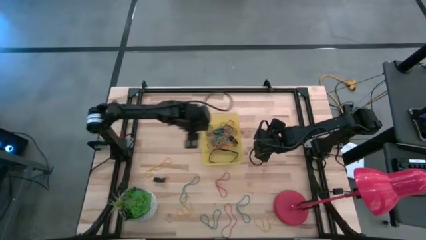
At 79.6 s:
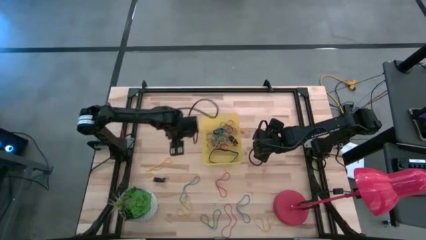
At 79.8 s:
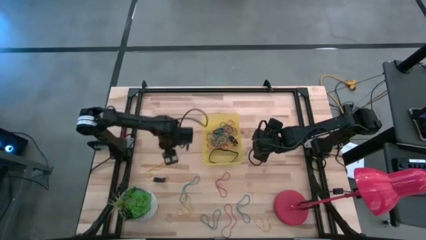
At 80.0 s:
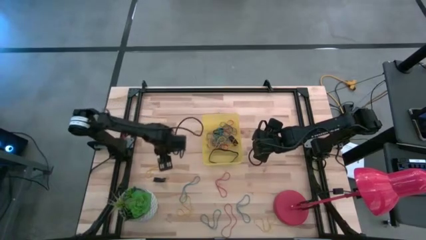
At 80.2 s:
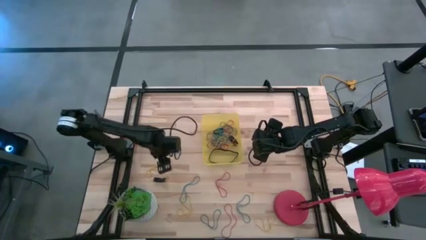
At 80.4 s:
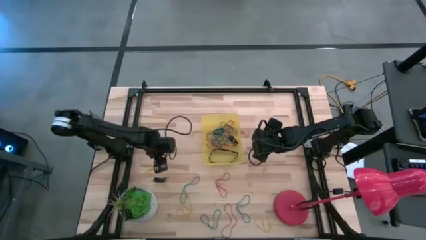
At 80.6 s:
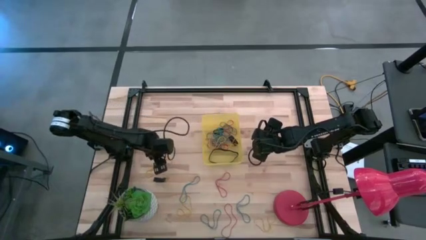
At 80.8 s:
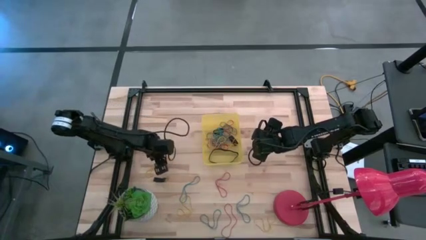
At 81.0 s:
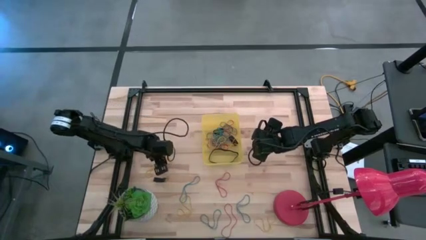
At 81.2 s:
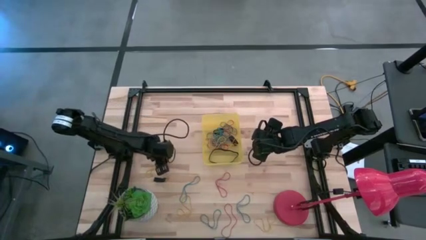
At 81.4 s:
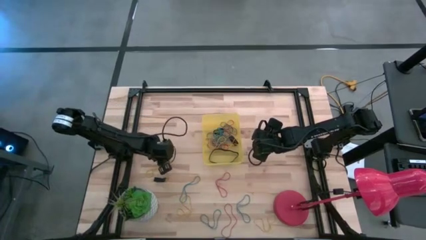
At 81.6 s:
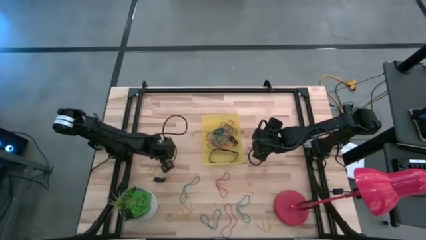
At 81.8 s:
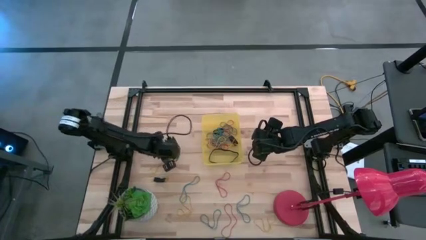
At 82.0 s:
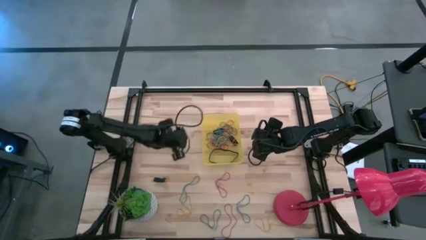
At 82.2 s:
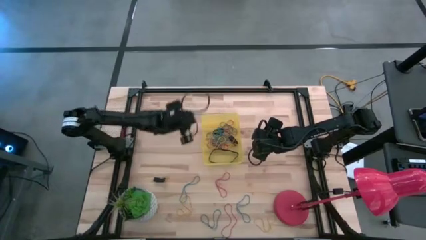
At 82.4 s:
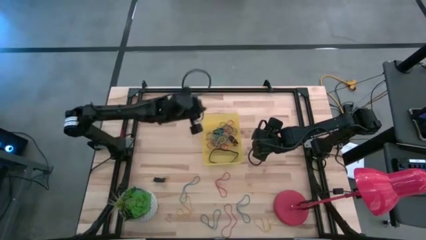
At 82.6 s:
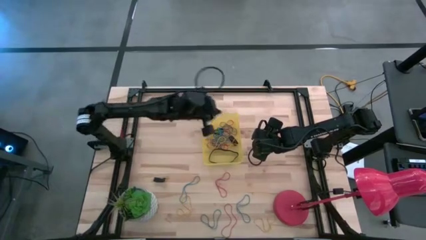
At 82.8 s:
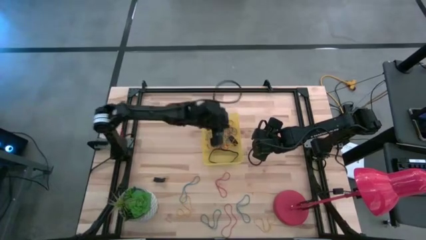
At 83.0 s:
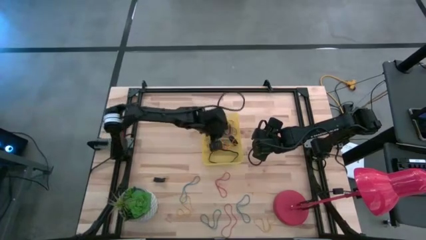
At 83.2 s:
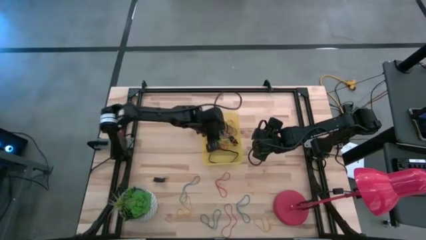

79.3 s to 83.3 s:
Task: Pick and place rubber bands into bin
Put the top left yellow rubber band into the yellow bin

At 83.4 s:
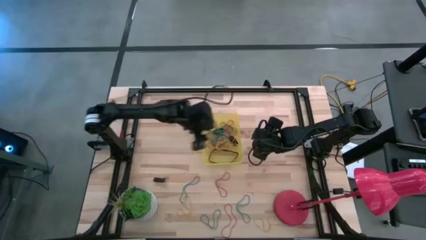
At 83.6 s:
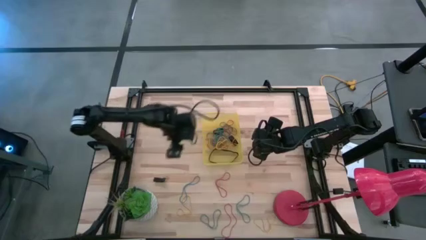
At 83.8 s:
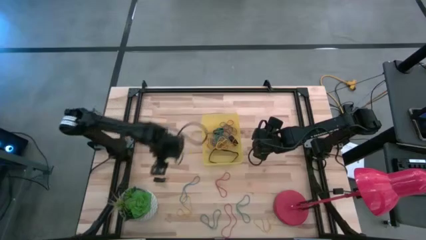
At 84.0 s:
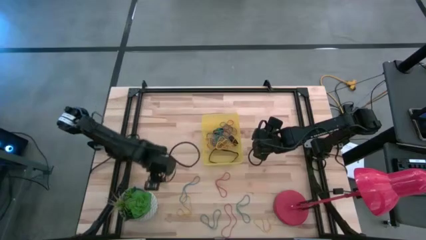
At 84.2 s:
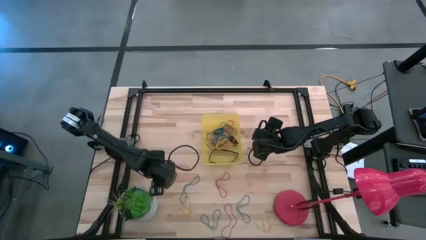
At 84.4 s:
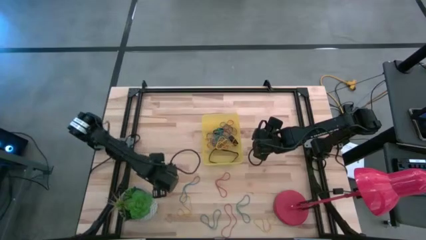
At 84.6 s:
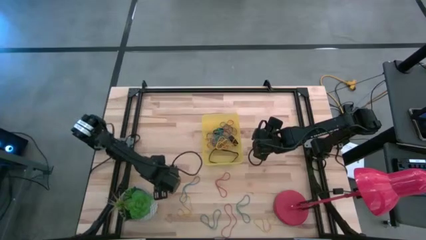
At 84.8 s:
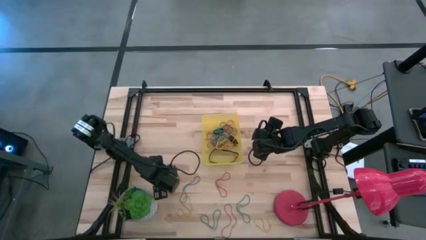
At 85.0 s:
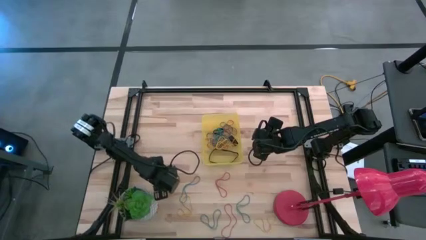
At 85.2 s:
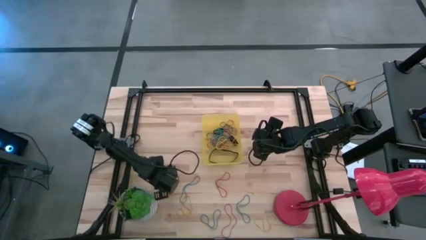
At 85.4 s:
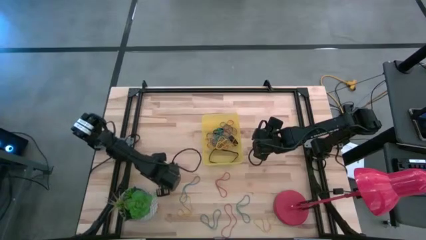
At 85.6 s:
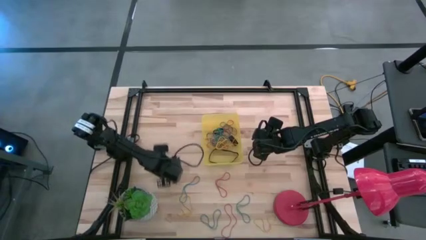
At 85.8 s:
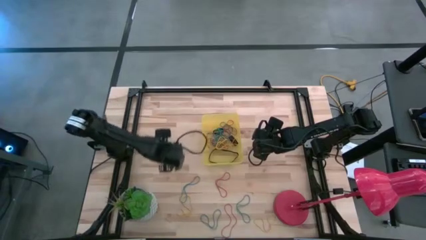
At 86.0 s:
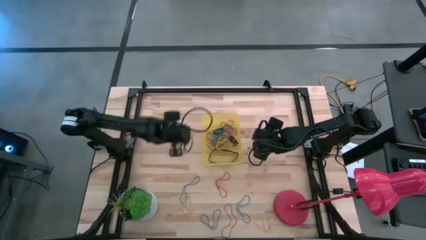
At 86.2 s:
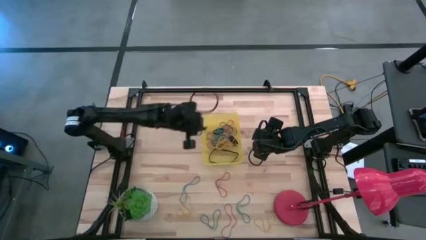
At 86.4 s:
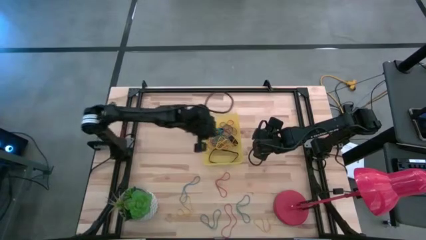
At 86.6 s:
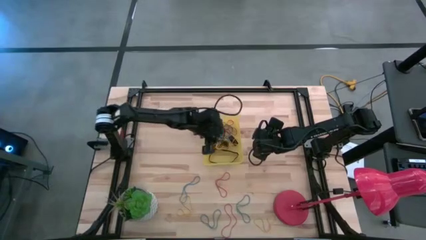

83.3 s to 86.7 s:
Put the small black rubber band into the yellow bin

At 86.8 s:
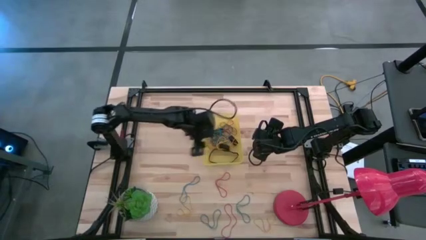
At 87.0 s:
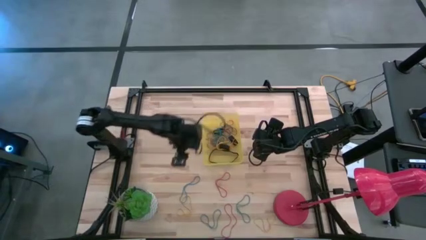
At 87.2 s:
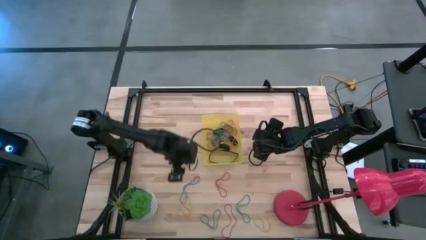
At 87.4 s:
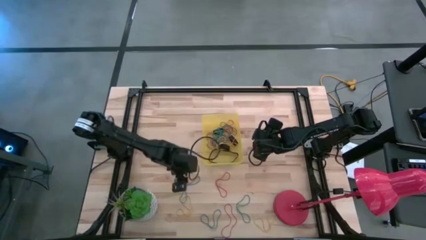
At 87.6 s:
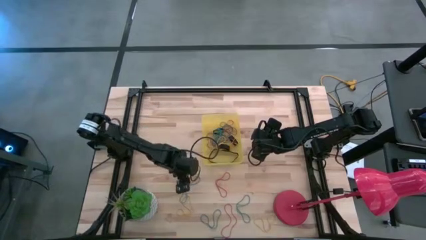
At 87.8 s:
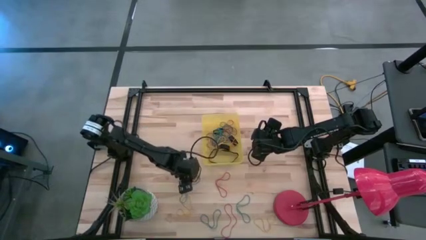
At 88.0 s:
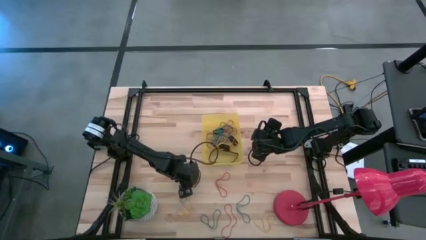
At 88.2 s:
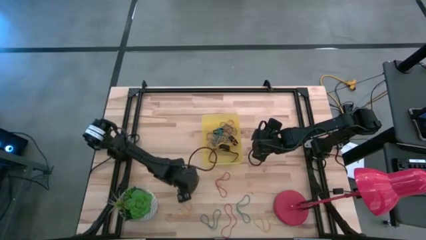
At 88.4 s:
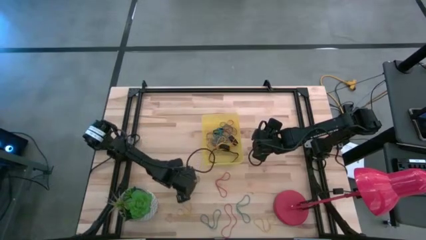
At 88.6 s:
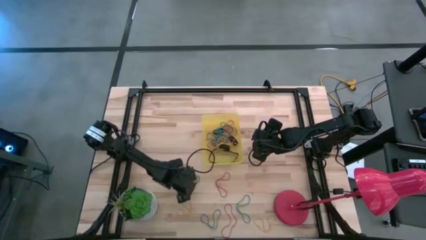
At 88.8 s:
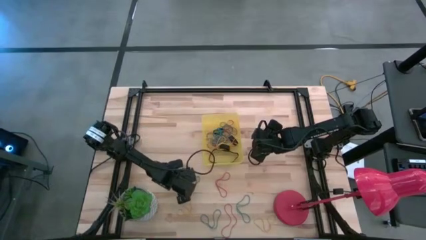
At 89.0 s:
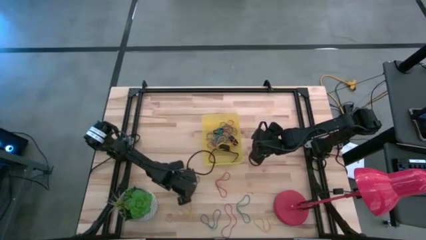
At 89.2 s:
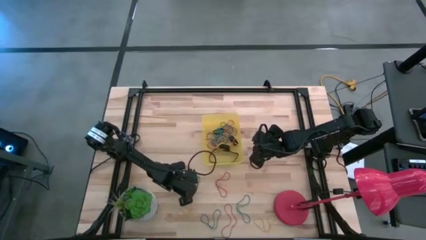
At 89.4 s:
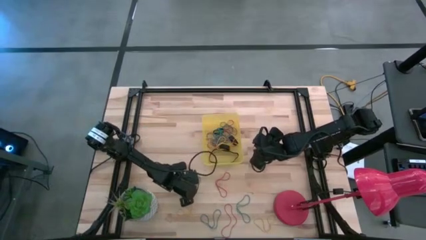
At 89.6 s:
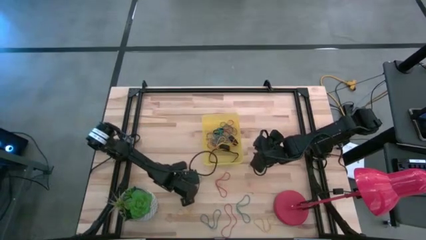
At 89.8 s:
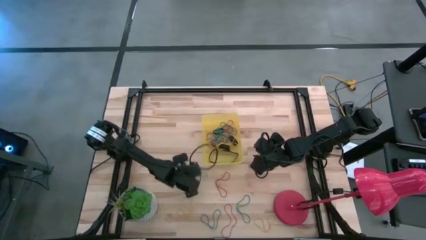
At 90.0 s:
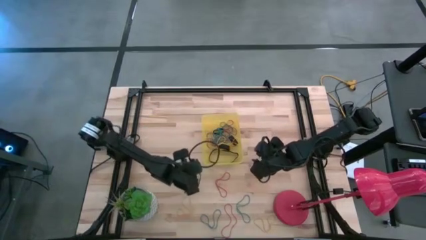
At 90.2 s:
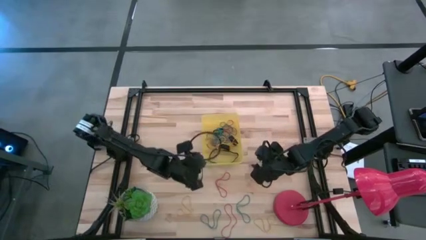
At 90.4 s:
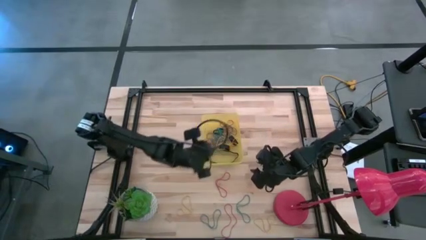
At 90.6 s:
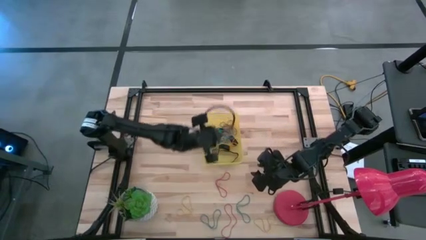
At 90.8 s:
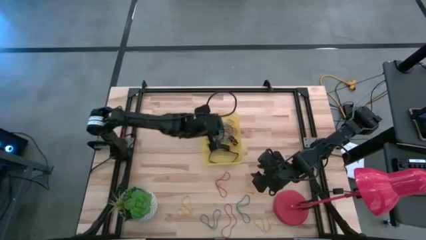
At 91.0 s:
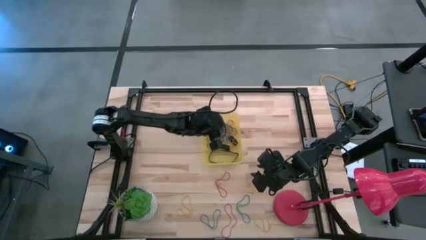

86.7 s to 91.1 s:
Put the top left blue rubber band into the yellow bin

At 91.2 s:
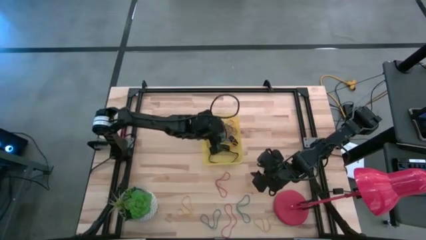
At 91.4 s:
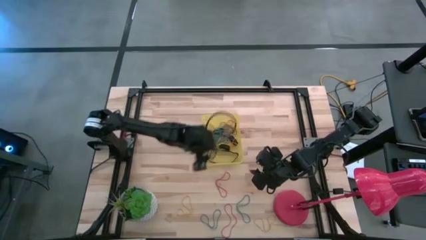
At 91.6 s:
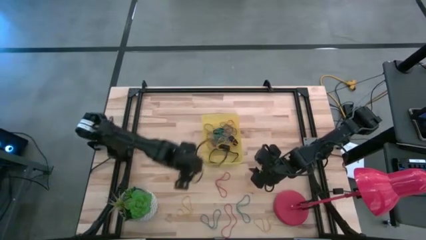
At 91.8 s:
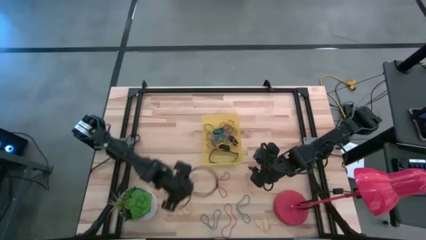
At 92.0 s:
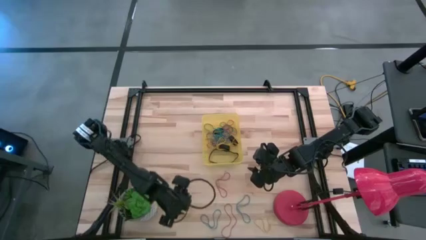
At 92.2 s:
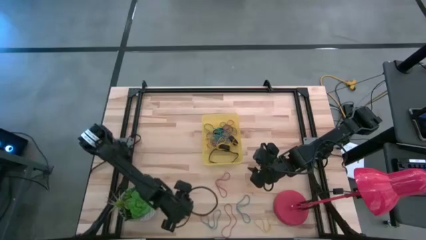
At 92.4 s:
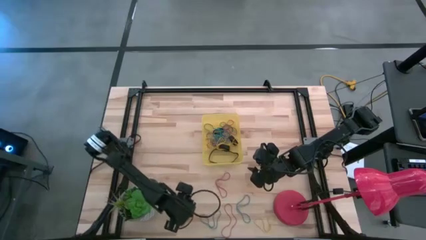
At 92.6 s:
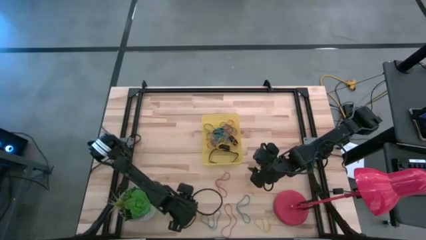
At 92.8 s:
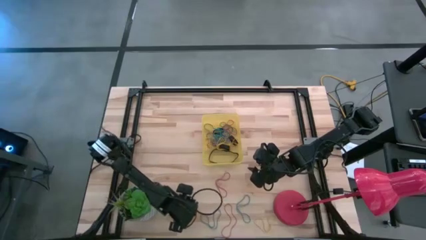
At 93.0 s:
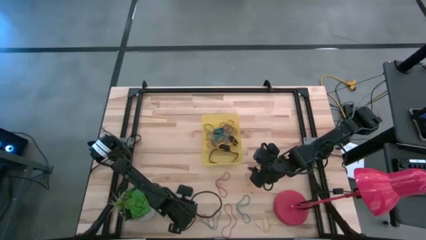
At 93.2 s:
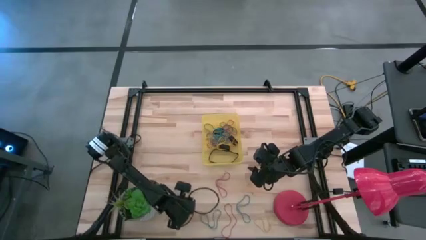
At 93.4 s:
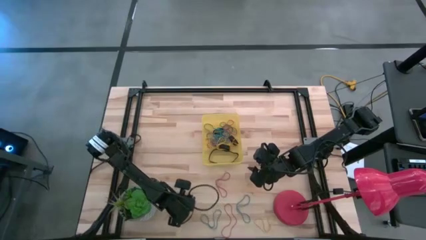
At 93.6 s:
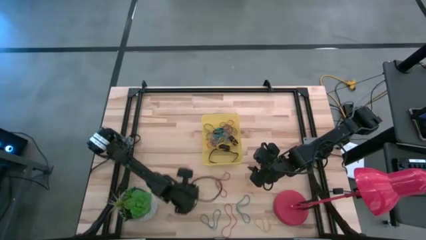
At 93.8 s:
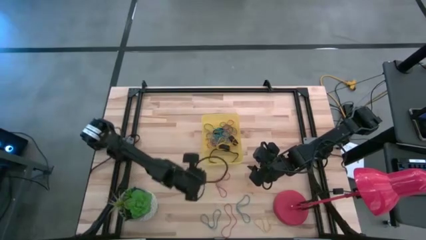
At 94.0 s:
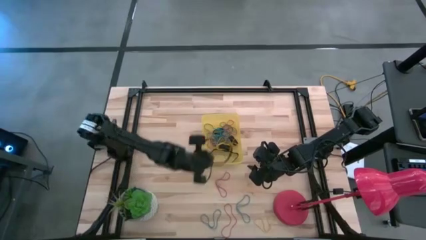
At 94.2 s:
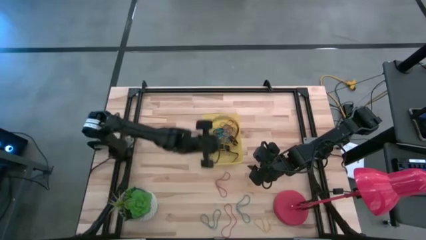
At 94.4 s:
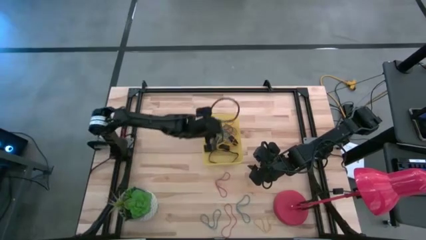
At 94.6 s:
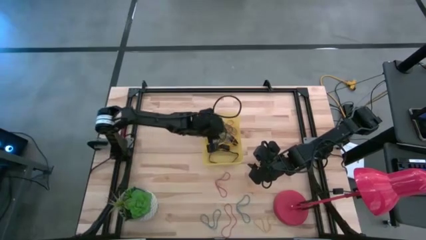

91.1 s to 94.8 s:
Put the left yellow rubber band into the yellow bin

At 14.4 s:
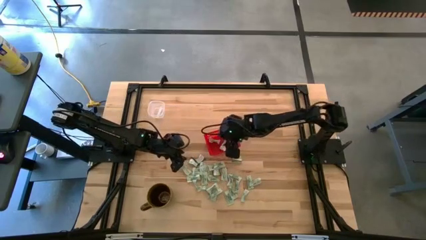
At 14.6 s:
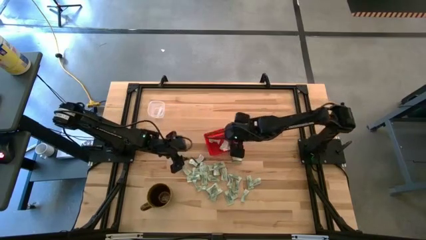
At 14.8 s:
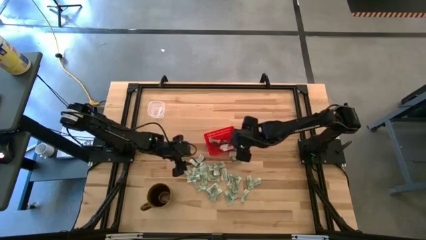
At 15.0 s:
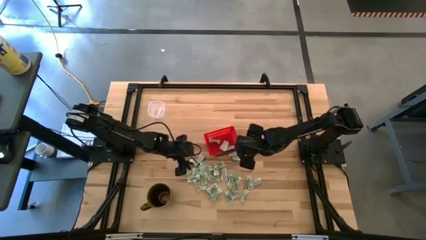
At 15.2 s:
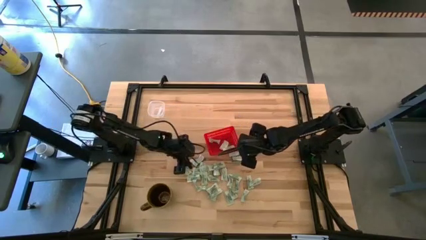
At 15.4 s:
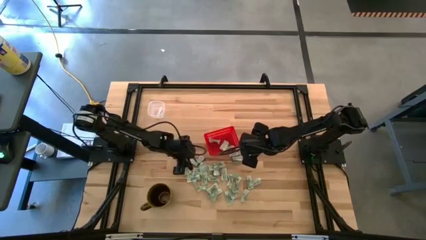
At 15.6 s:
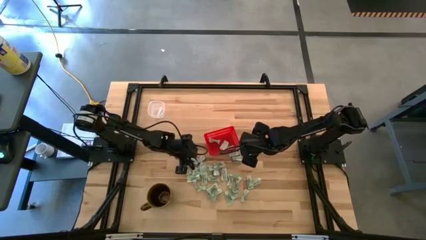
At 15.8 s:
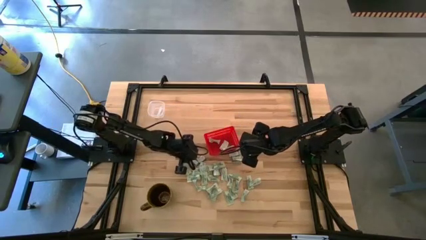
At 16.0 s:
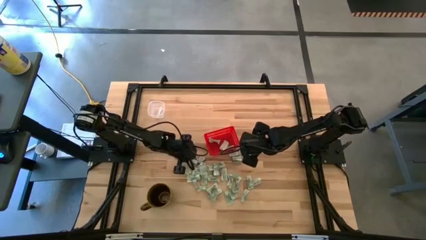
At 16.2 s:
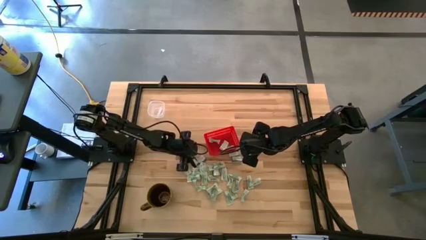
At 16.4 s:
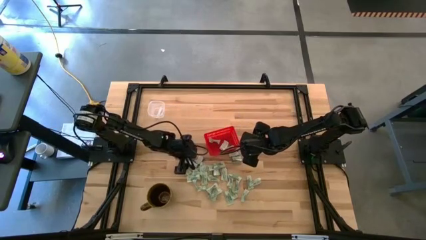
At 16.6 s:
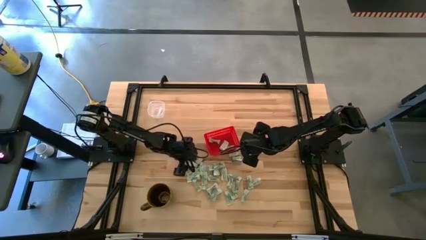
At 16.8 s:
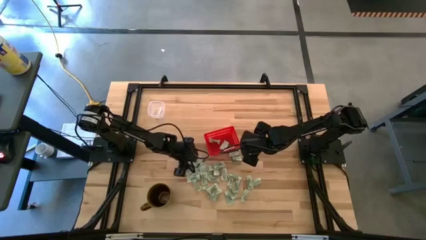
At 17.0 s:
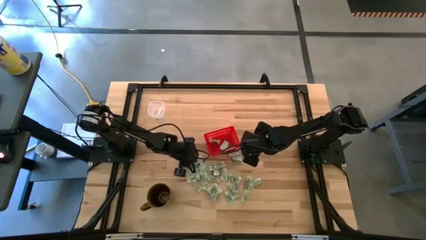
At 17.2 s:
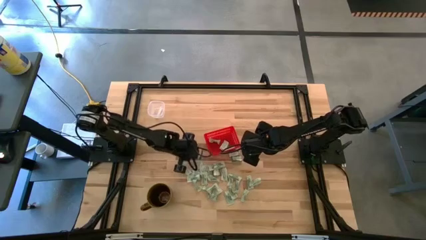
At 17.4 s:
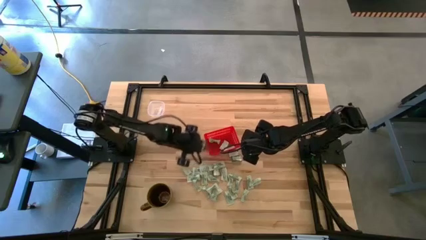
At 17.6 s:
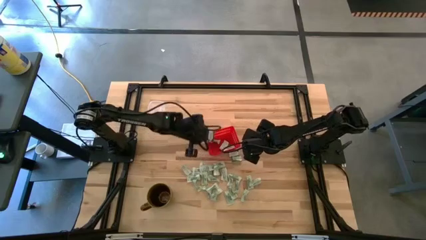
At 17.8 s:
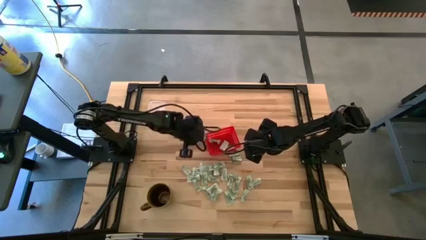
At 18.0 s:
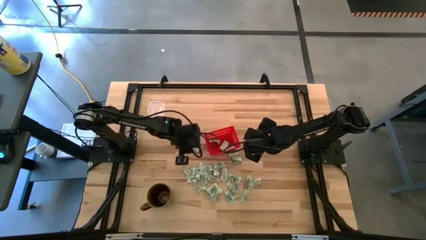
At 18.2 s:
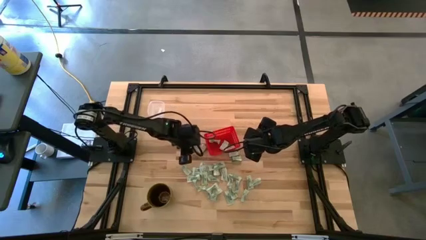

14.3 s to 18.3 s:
Task: Pick and place items into bin
Put the white truvia packet into the red bin
